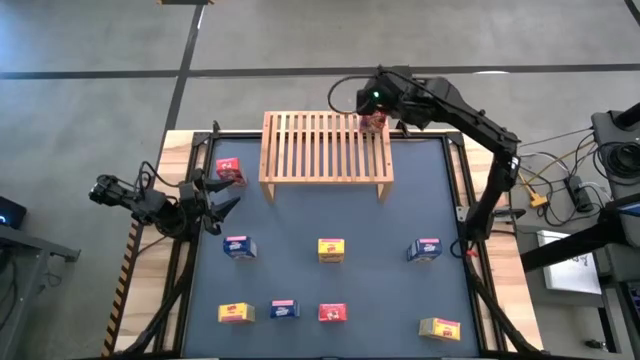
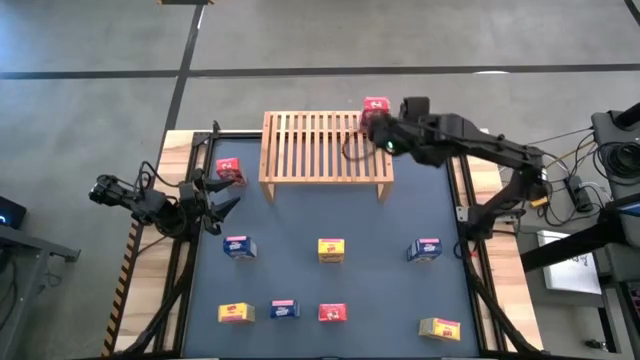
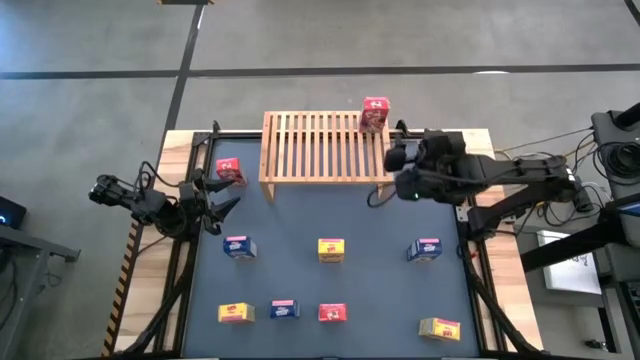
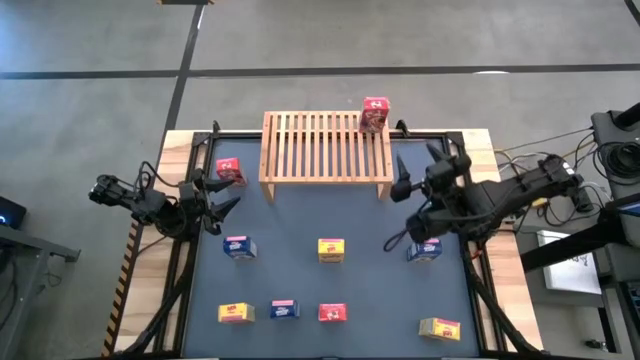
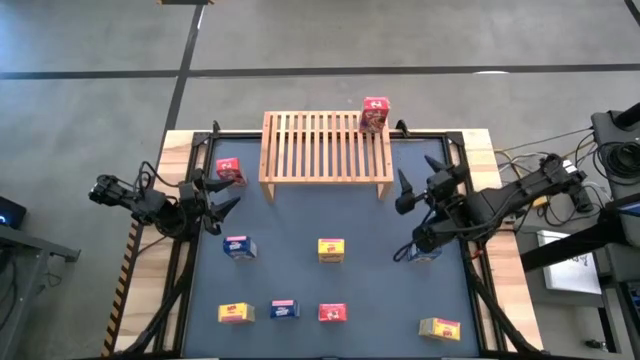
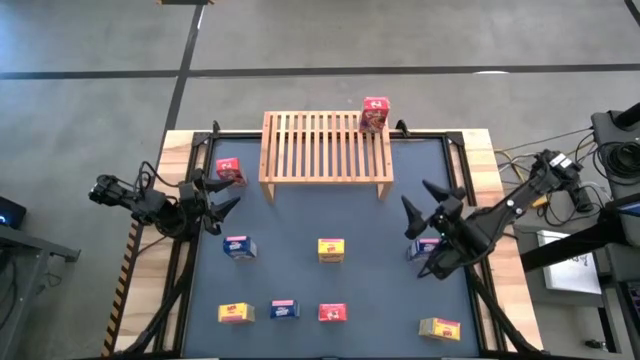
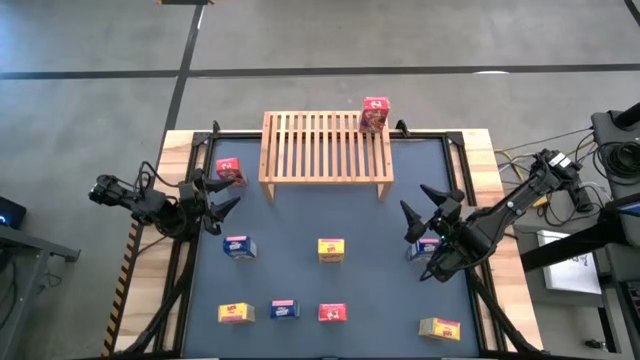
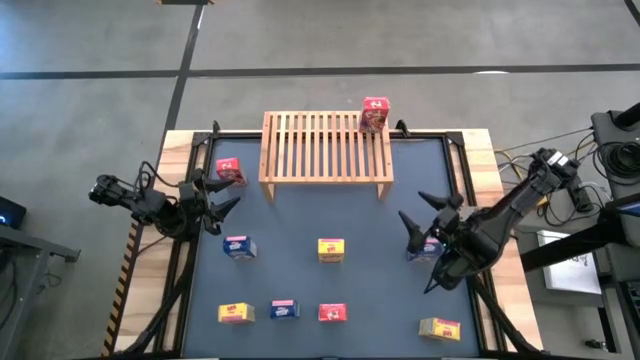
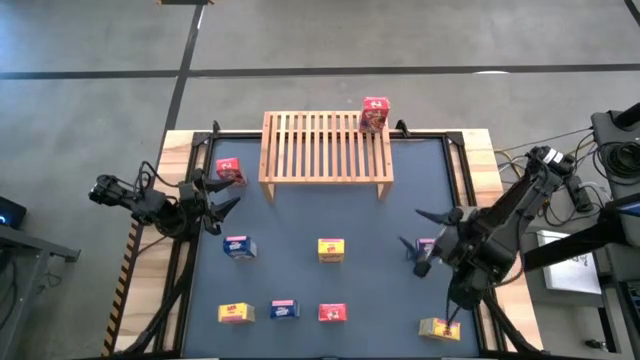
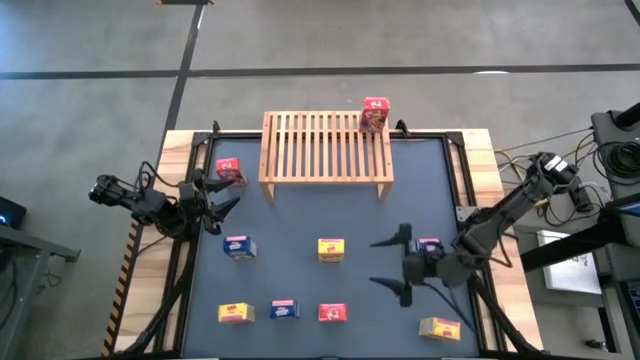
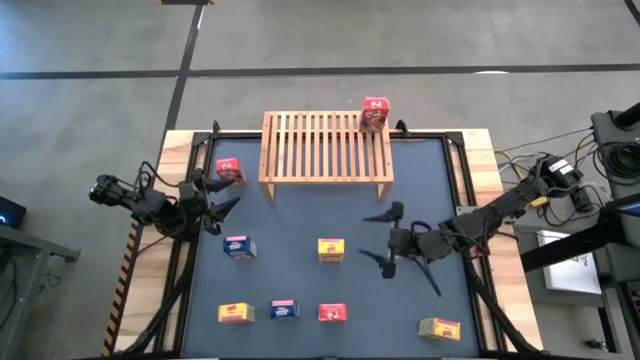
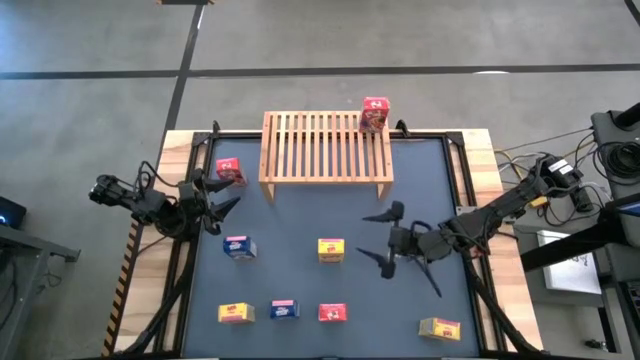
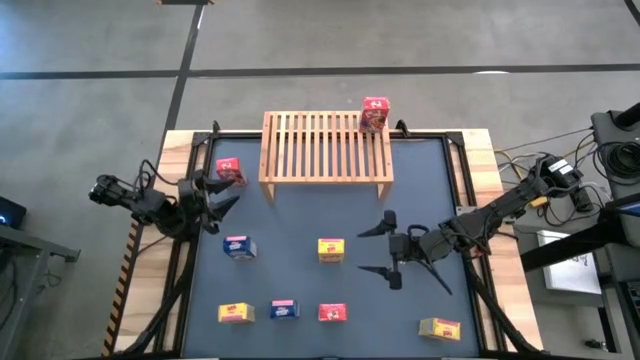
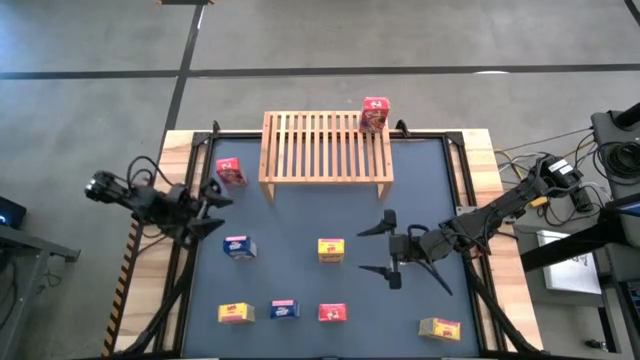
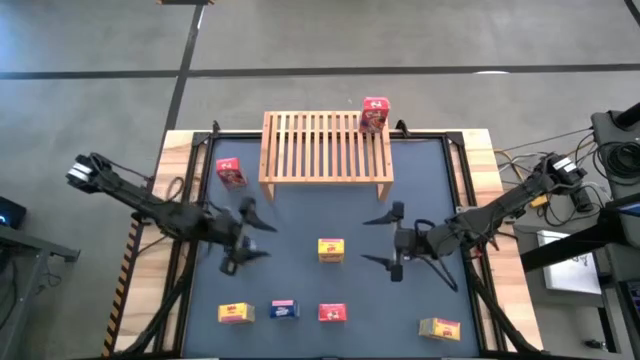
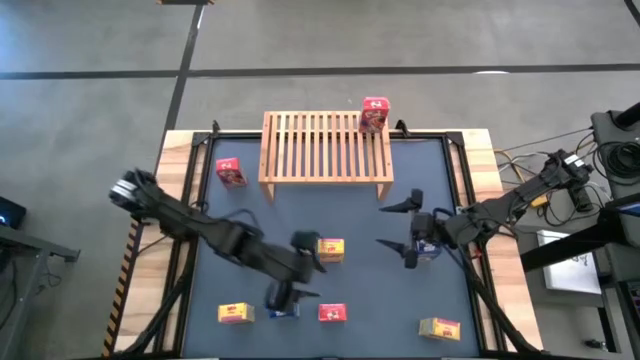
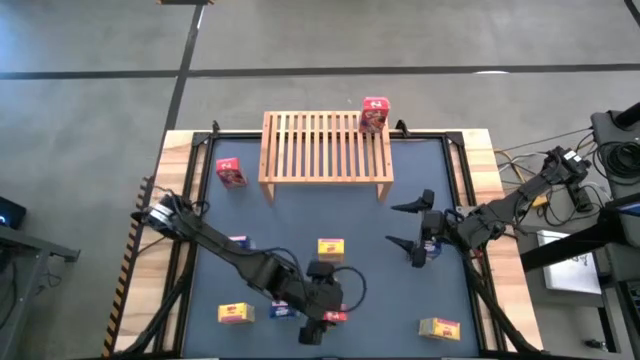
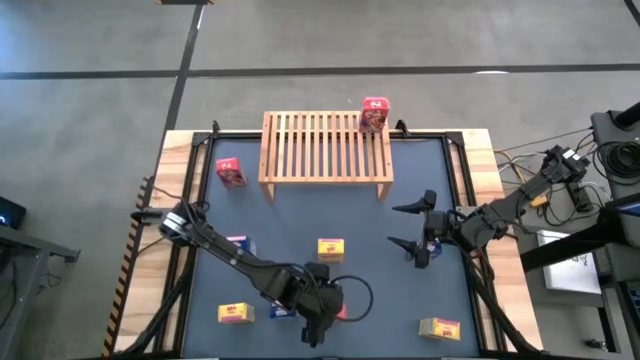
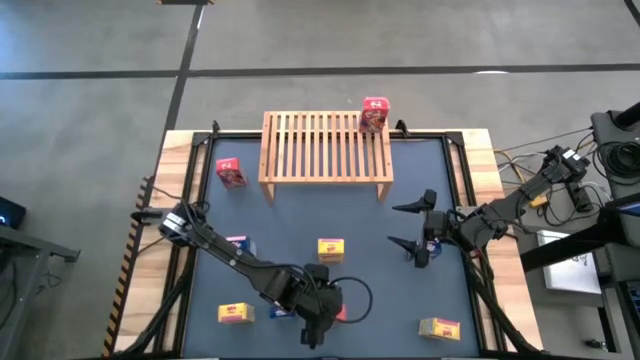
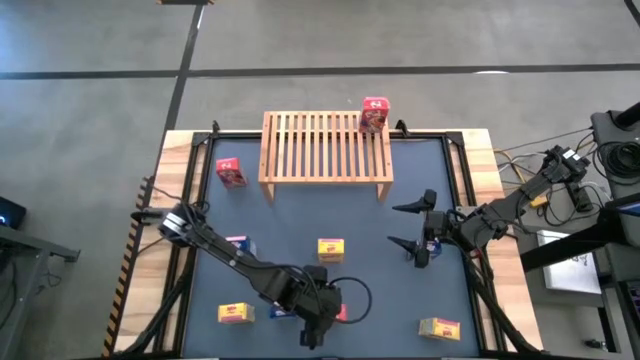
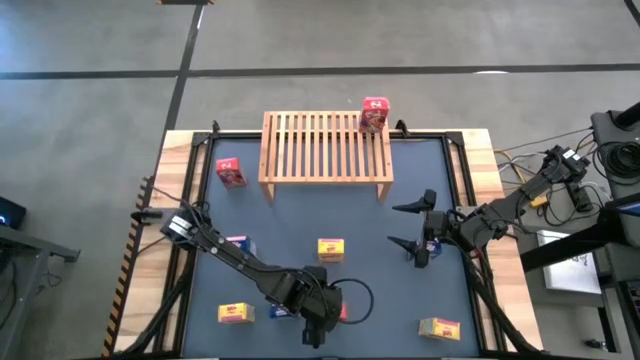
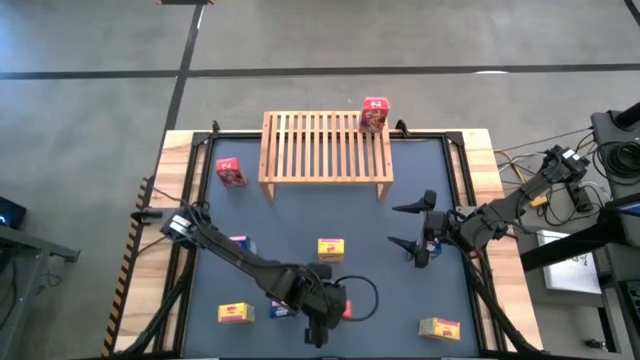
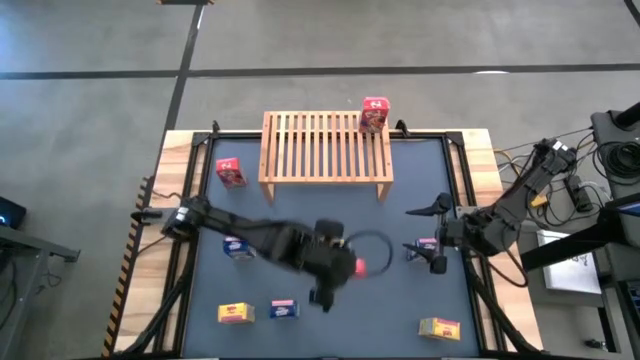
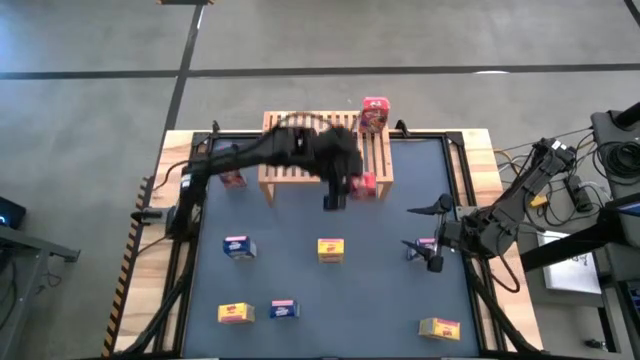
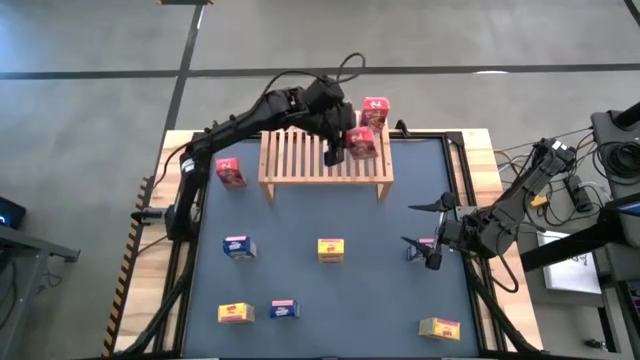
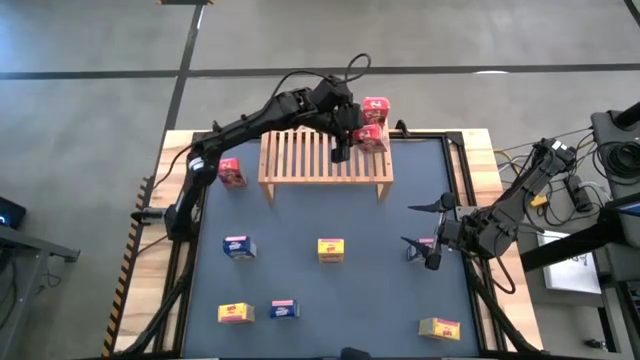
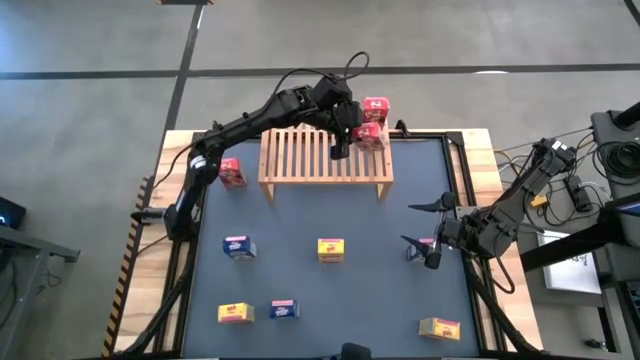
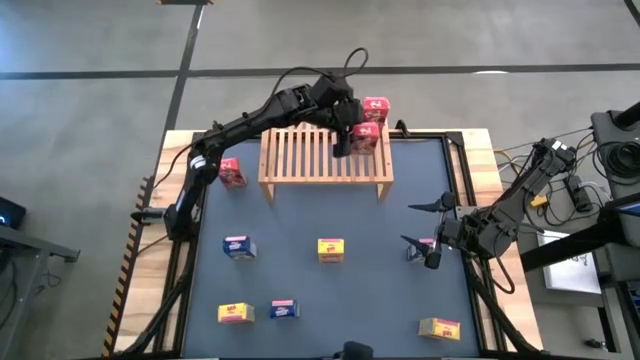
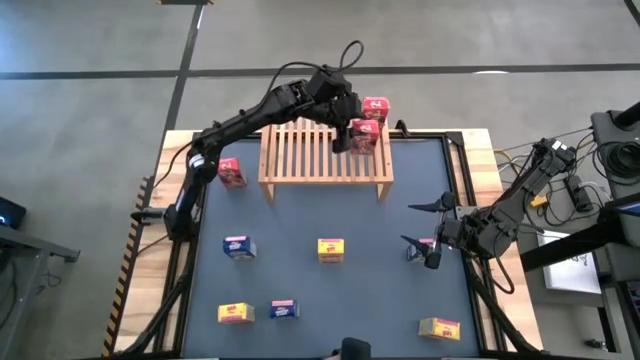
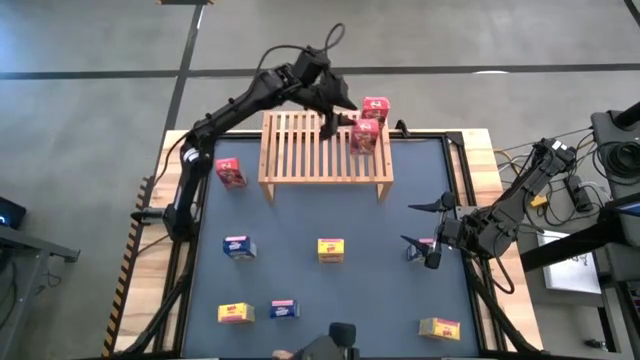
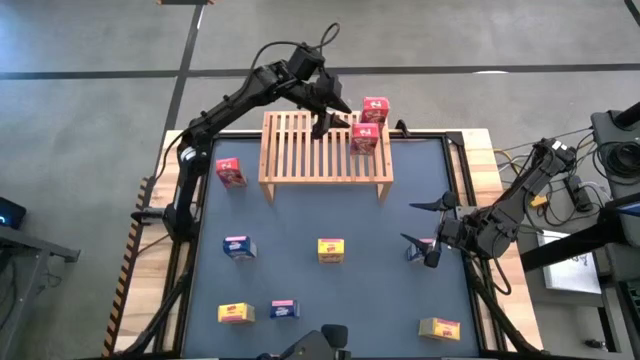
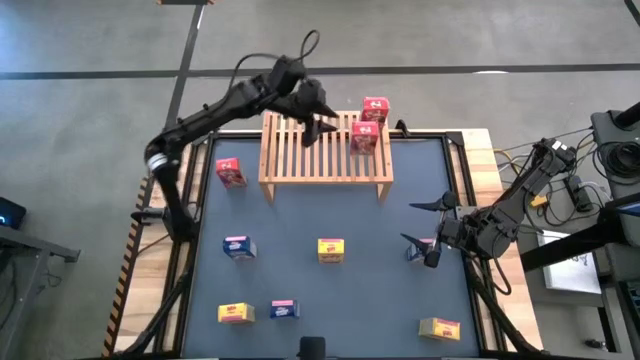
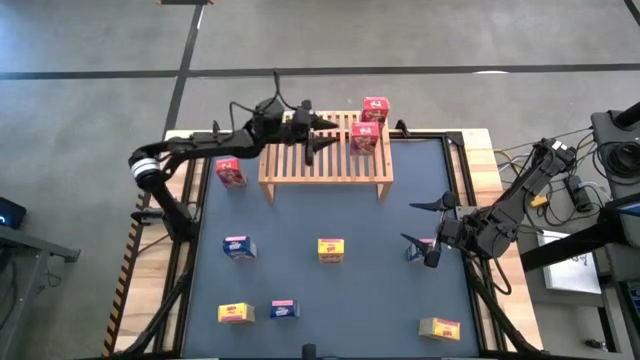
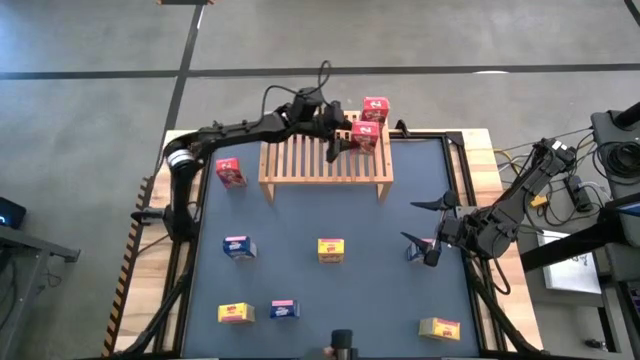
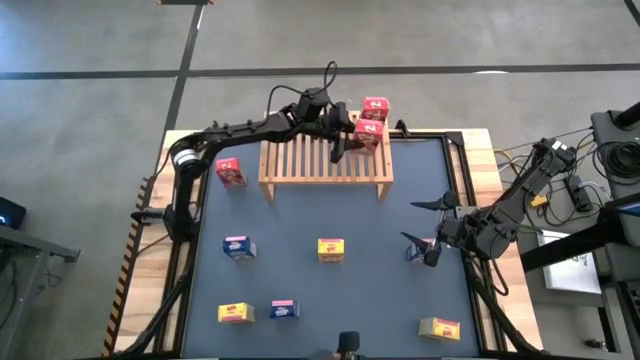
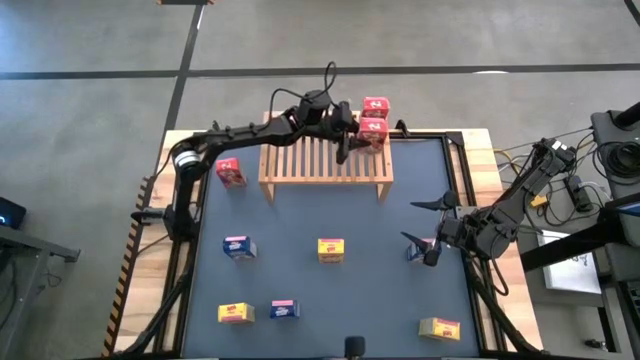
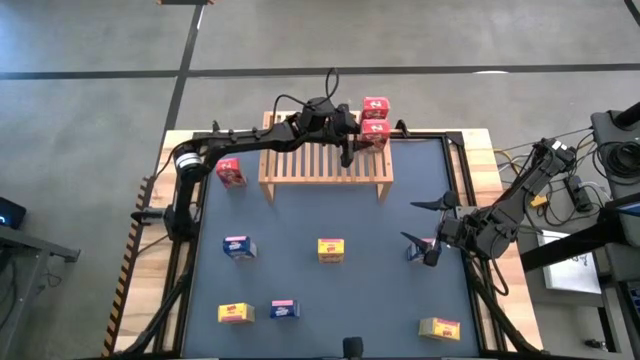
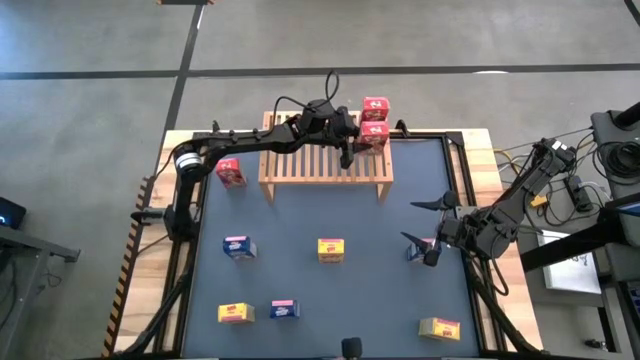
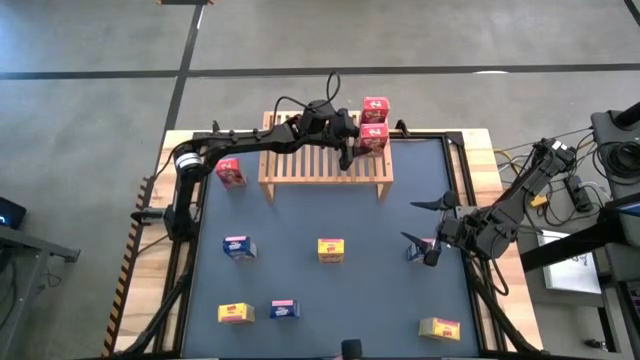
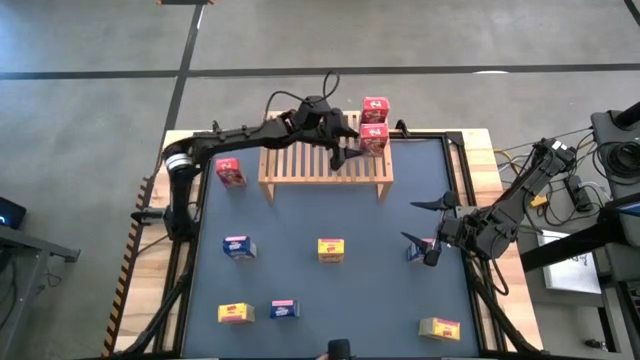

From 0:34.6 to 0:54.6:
Task: Stack cereal on shelf
Put the bottom red cereal box on the shelf aligned with the other red cereal box

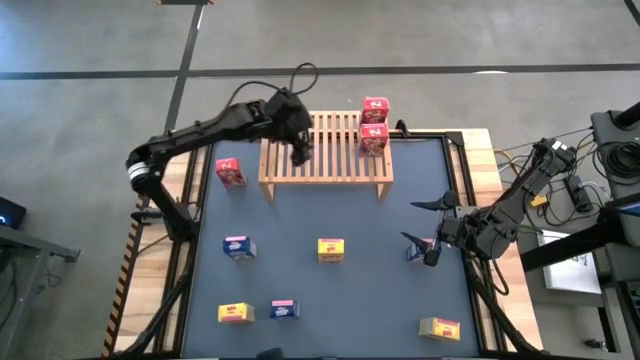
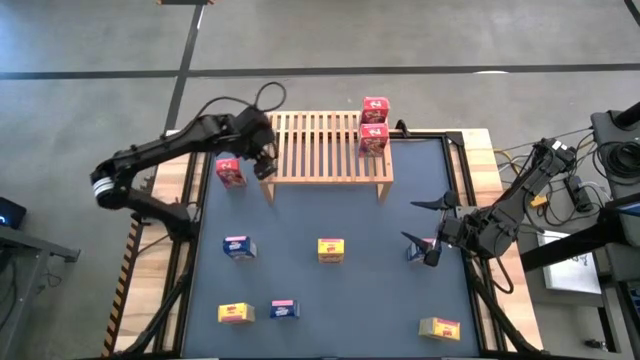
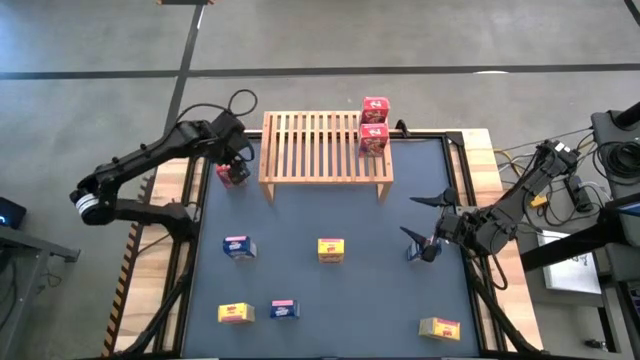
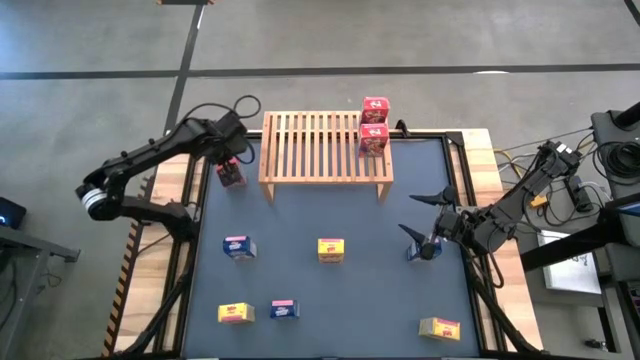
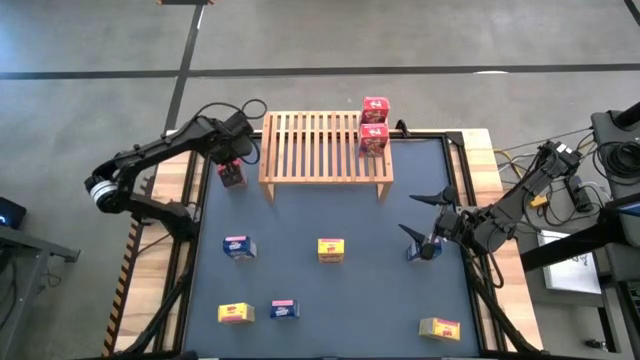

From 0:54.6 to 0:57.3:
Put the red cereal box on the shelf aligned with the other red cereal boxes
